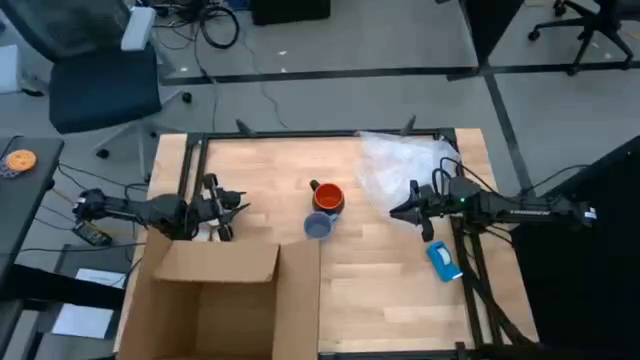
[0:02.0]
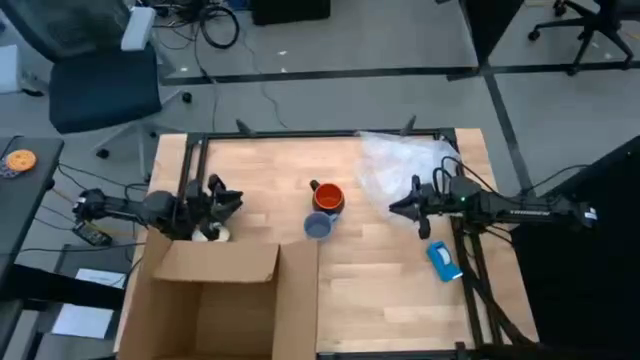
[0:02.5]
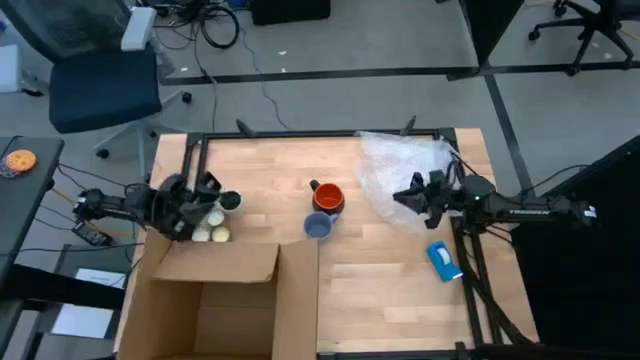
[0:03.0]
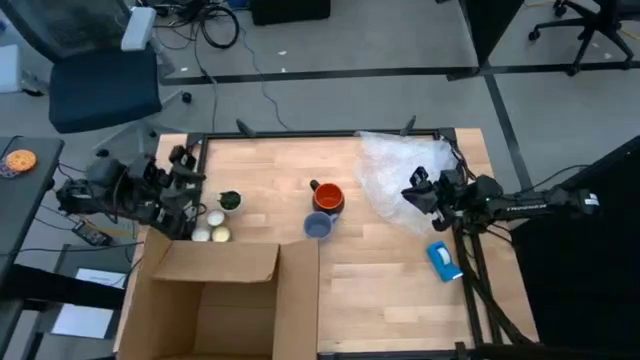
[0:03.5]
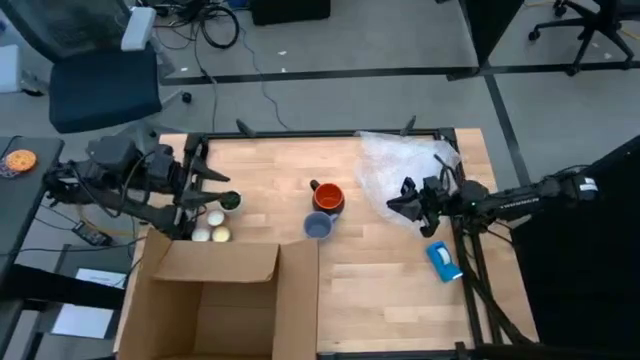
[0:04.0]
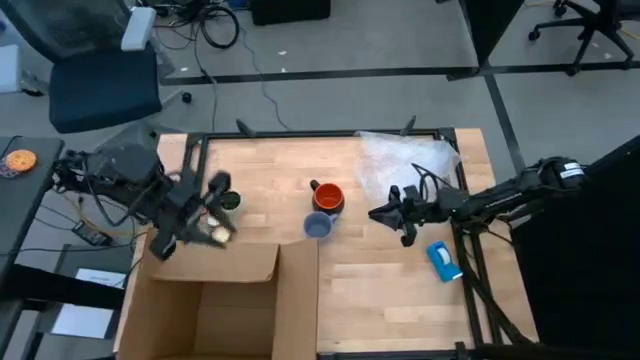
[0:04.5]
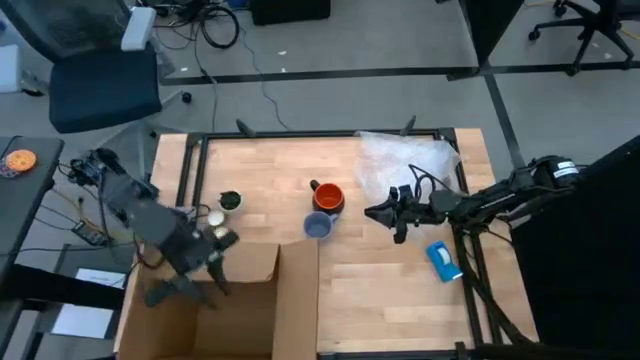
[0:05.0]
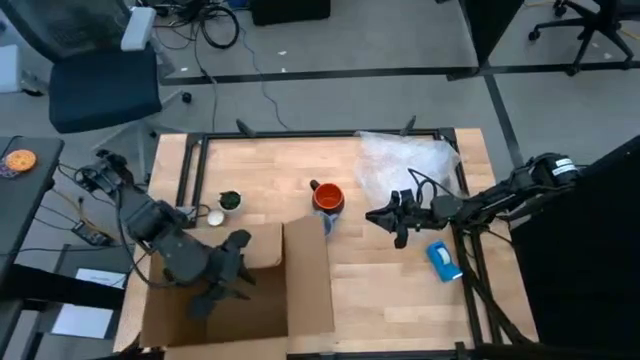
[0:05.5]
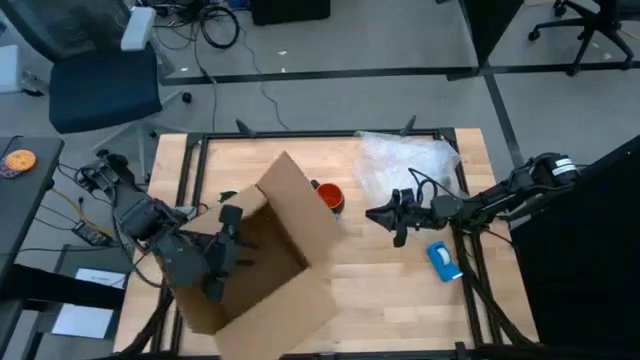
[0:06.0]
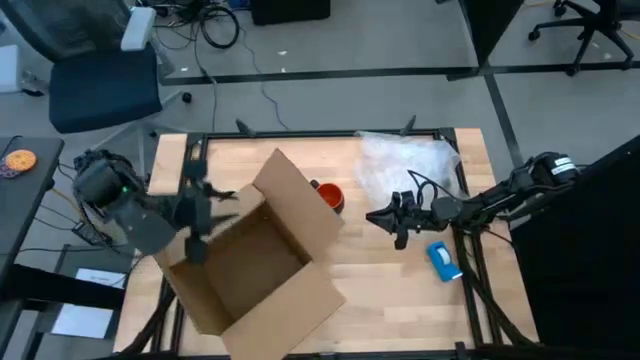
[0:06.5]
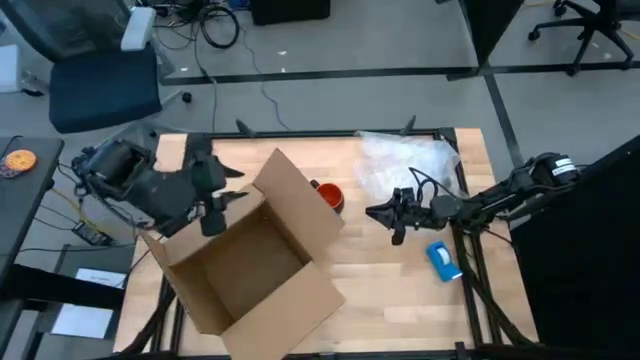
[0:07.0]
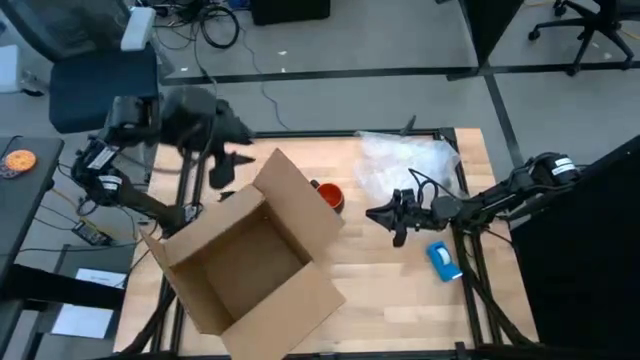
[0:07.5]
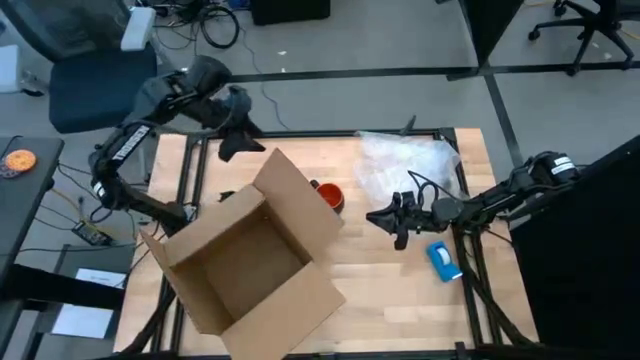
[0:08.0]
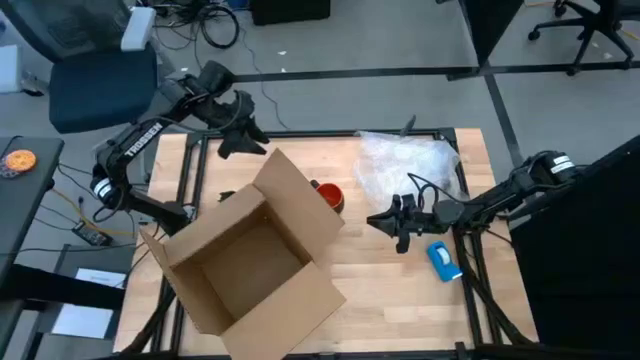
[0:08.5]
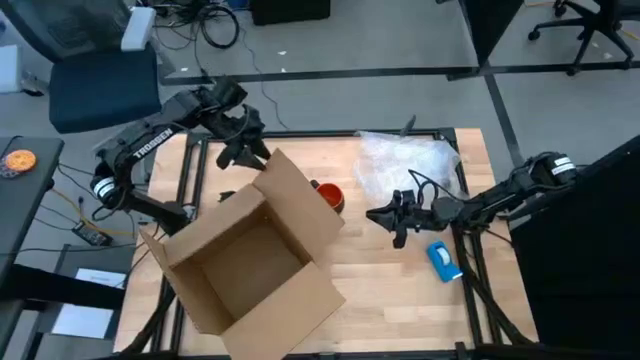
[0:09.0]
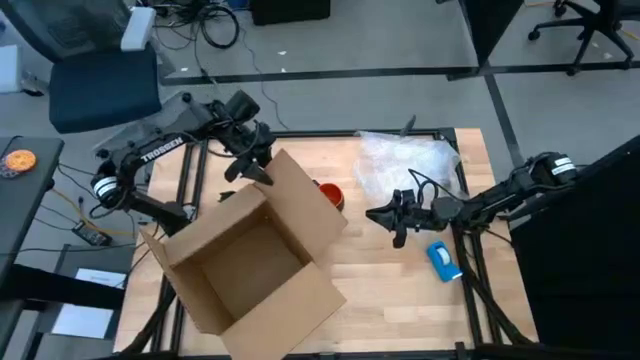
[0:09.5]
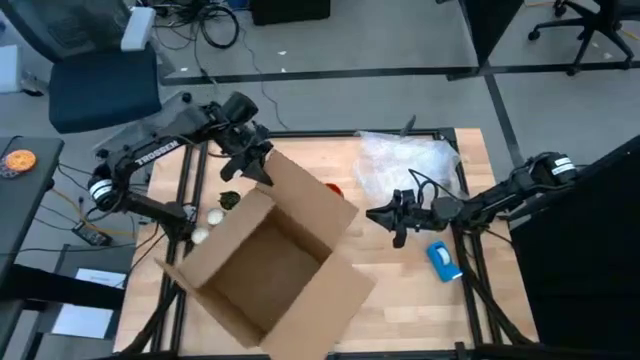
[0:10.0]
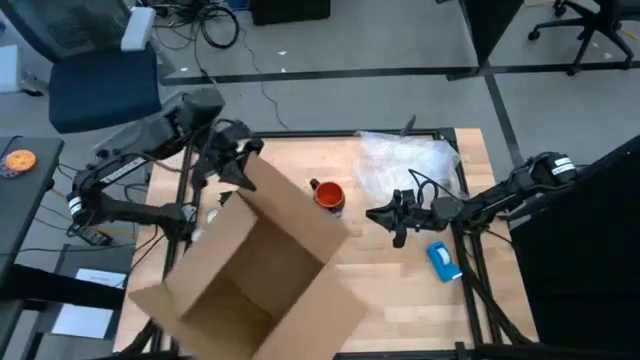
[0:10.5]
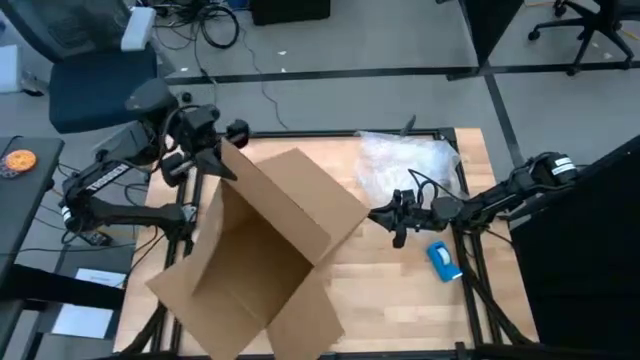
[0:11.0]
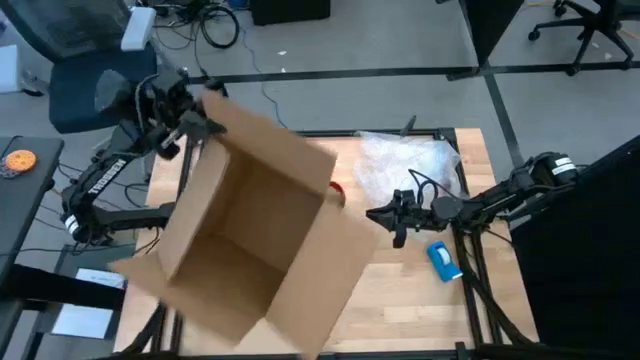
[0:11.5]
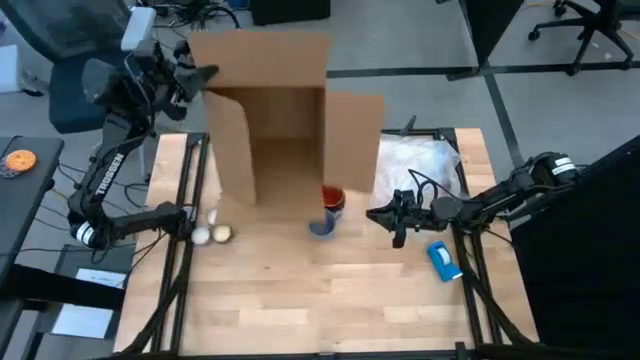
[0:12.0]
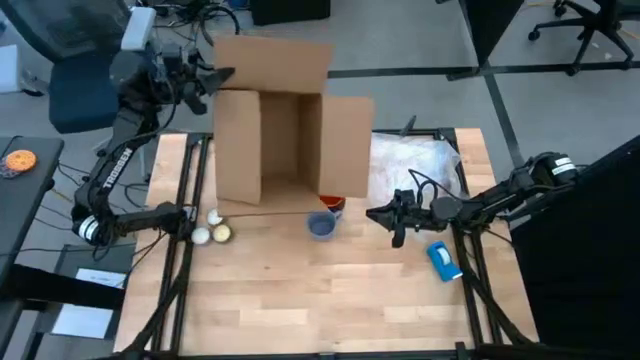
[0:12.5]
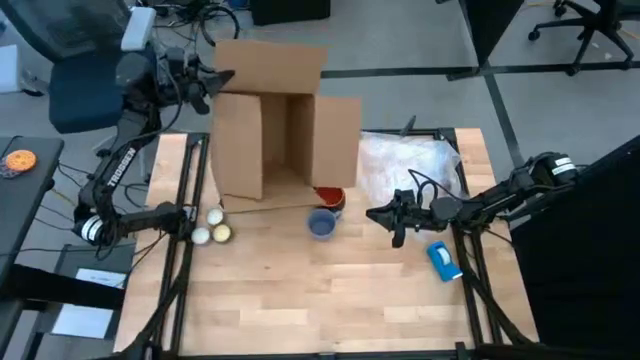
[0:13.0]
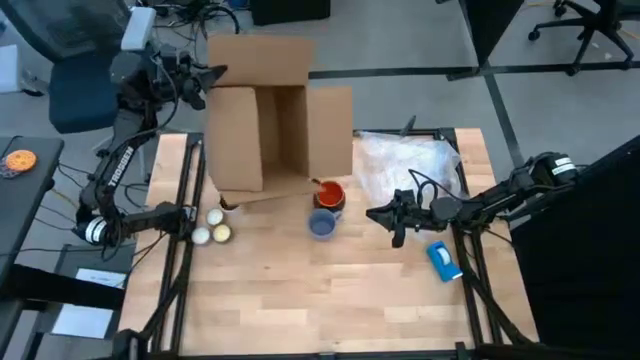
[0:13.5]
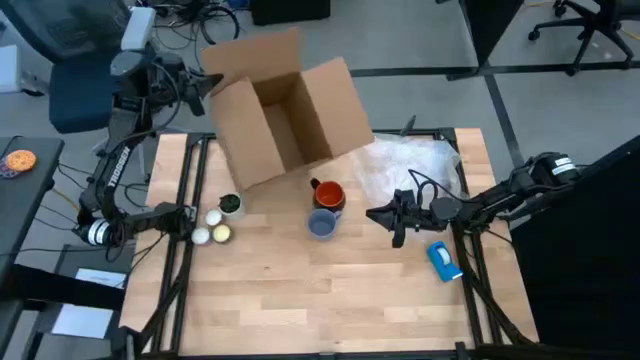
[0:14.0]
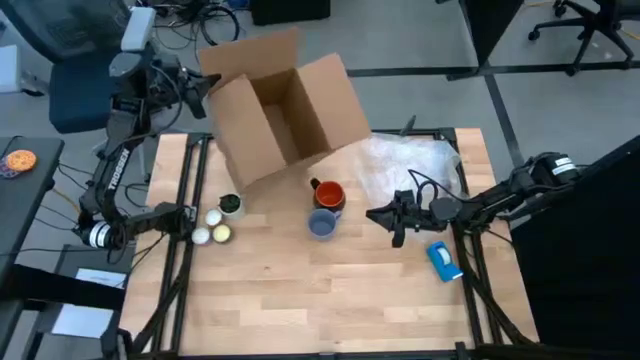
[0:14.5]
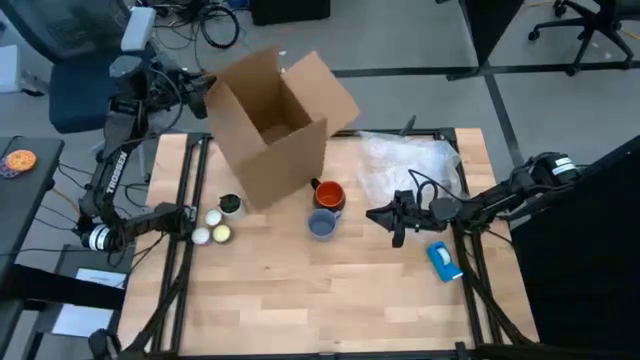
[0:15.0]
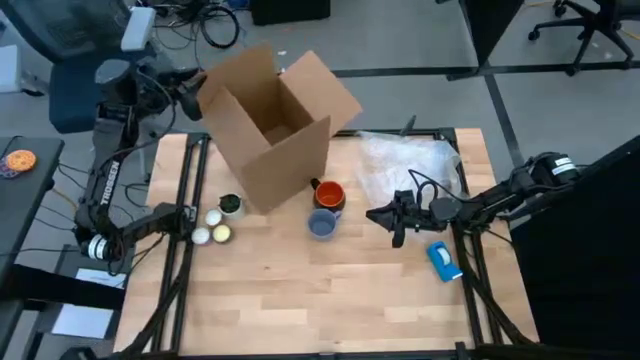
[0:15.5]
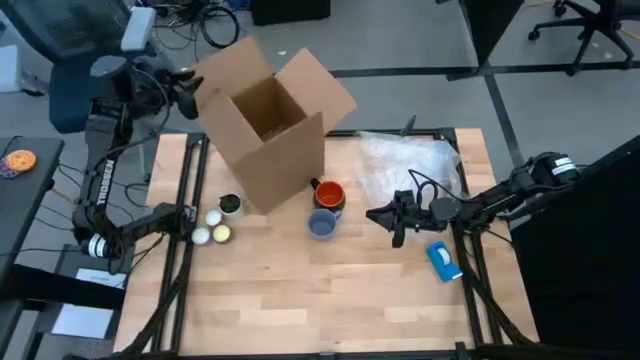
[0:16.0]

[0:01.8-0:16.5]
Task: wrap mug
Prepare the box

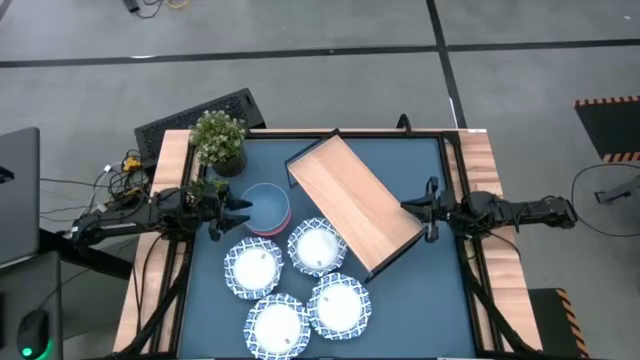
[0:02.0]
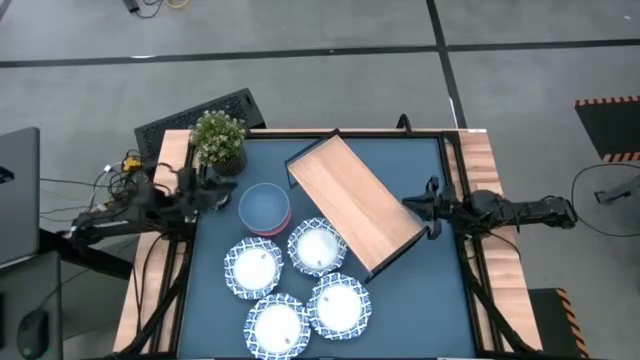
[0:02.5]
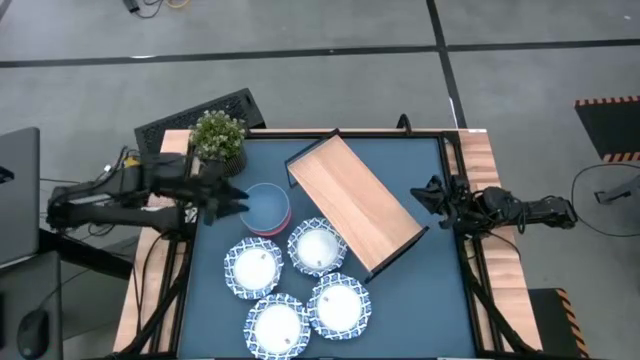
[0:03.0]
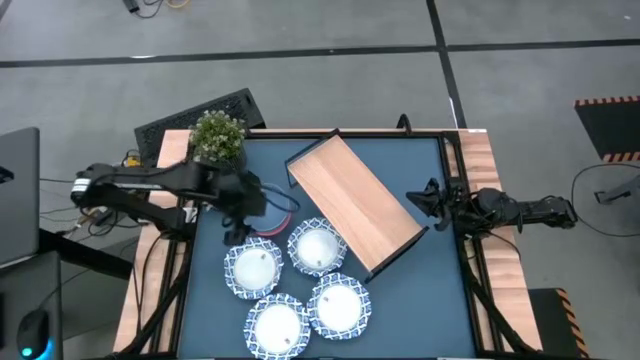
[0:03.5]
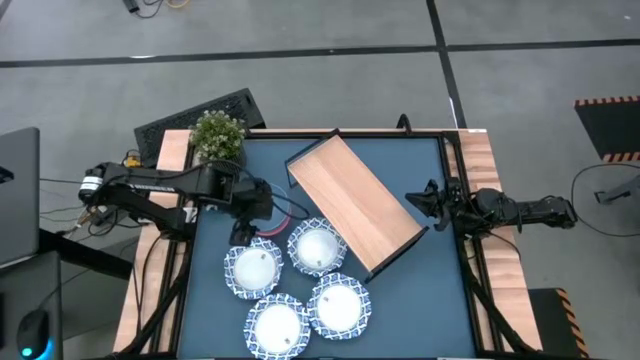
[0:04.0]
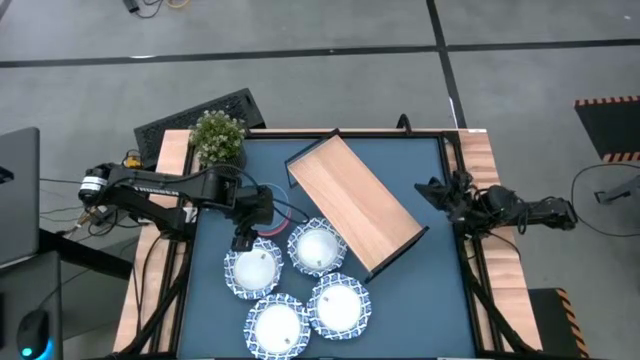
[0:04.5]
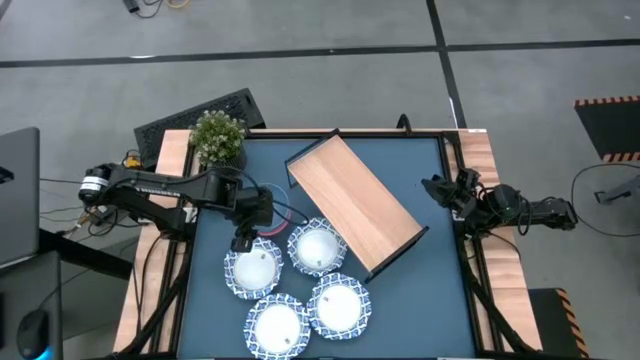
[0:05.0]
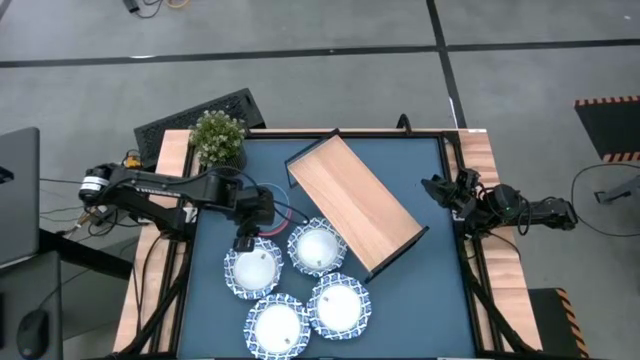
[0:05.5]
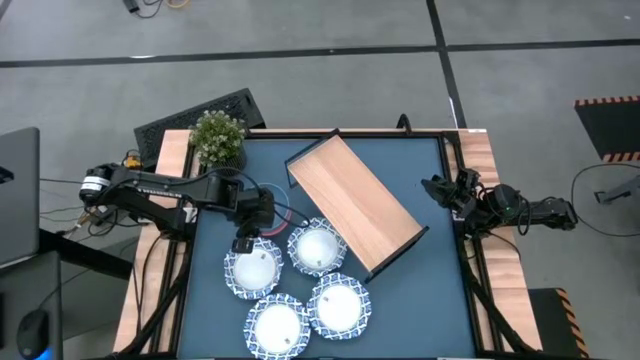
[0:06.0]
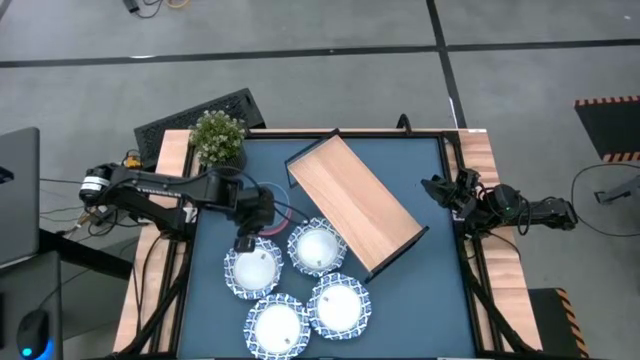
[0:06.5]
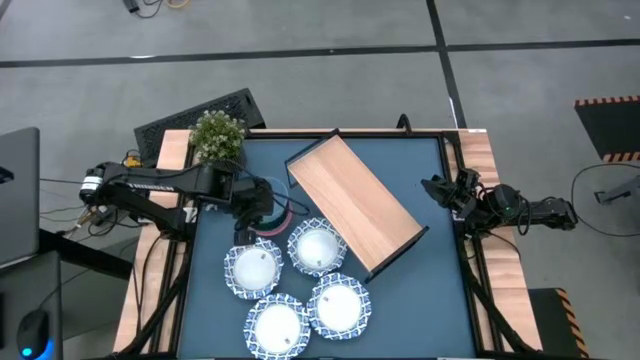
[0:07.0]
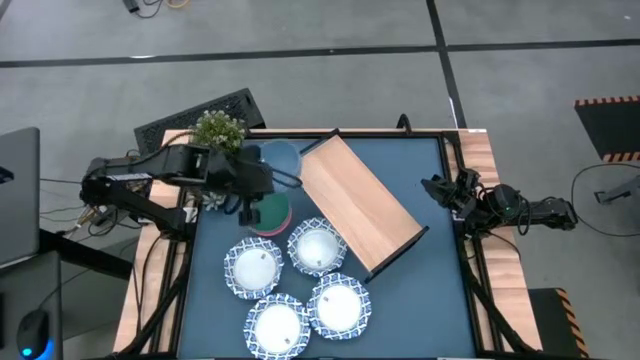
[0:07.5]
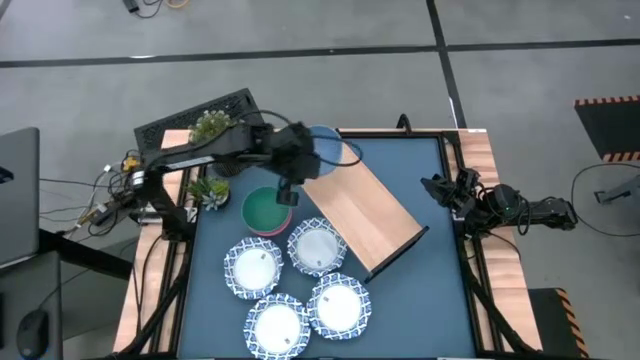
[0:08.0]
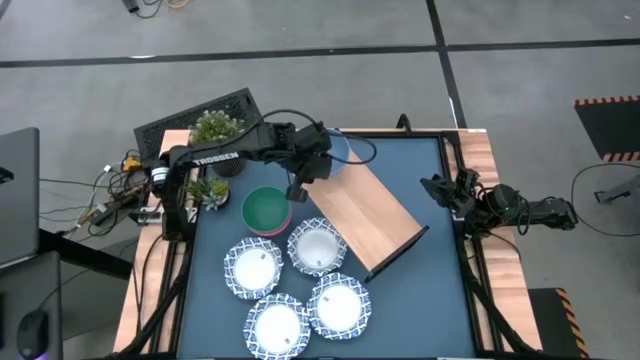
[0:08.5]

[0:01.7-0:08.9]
Task: Place and stack plates onto a shelf
Put the blue bowl on the shelf
